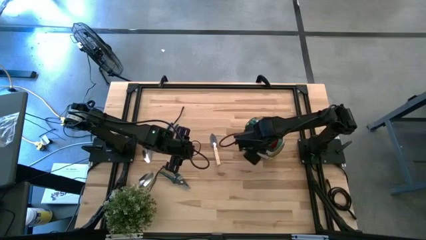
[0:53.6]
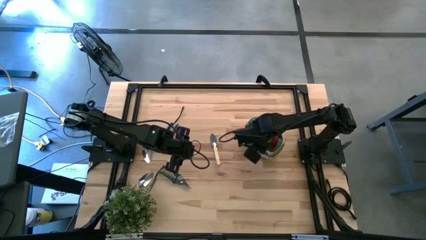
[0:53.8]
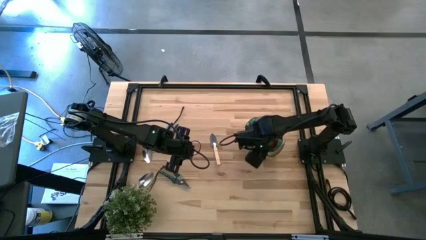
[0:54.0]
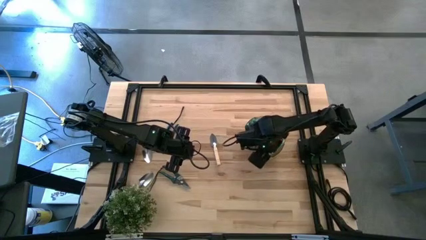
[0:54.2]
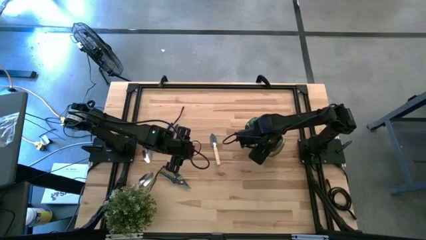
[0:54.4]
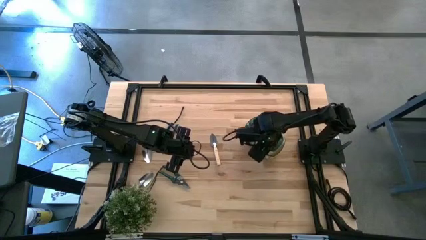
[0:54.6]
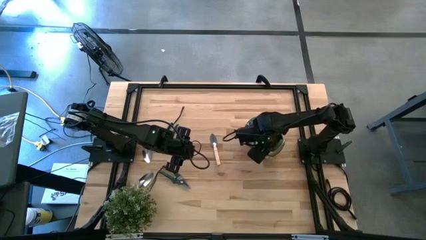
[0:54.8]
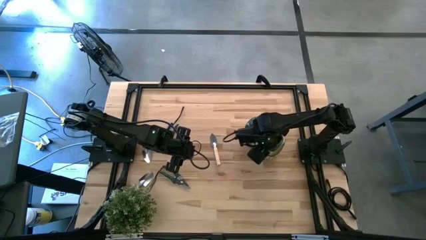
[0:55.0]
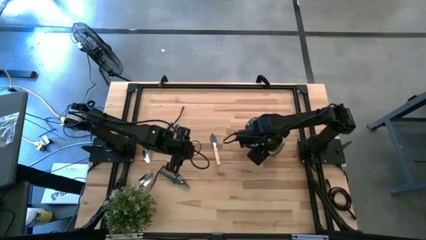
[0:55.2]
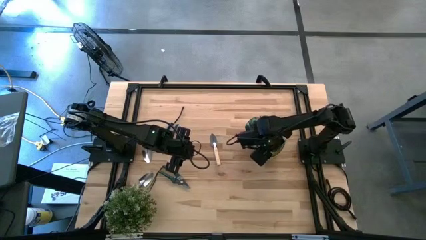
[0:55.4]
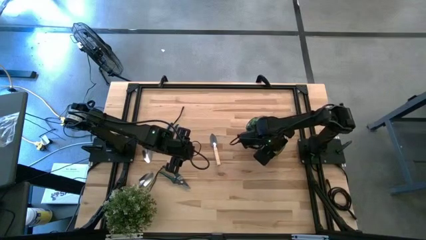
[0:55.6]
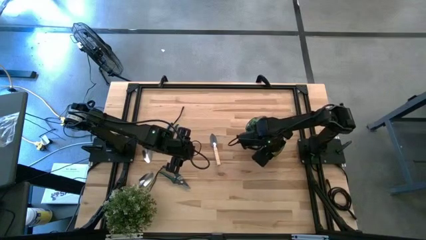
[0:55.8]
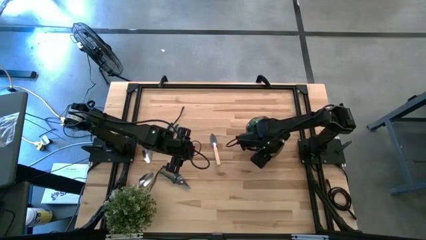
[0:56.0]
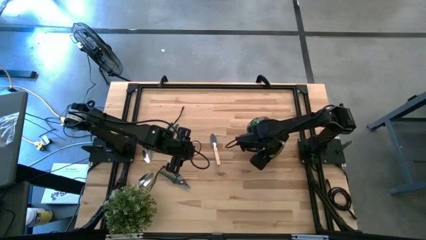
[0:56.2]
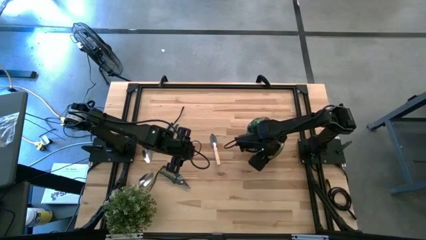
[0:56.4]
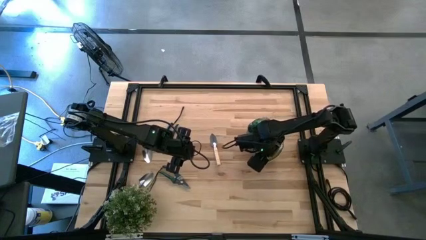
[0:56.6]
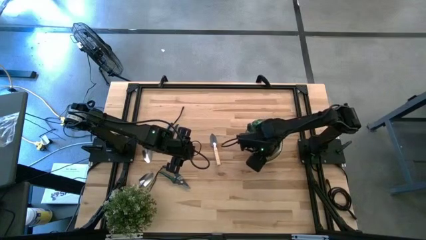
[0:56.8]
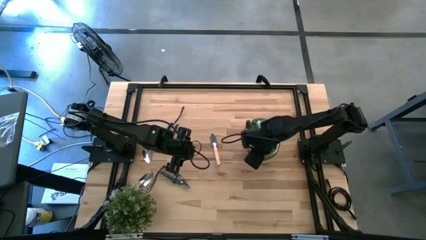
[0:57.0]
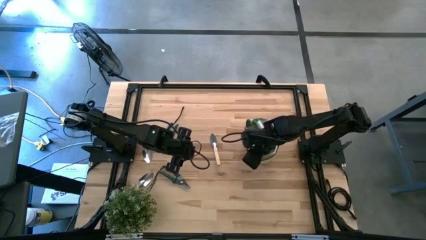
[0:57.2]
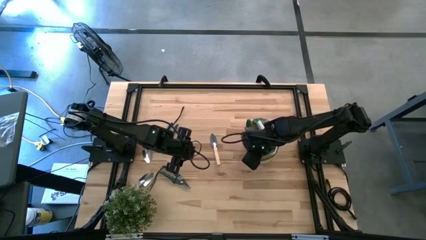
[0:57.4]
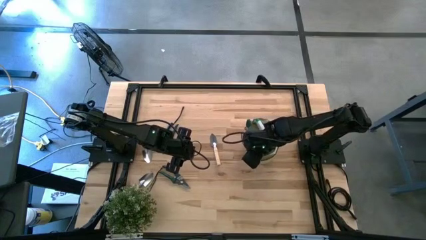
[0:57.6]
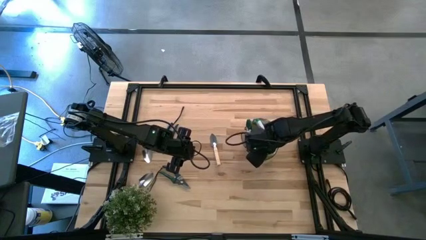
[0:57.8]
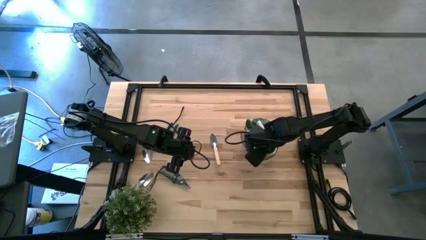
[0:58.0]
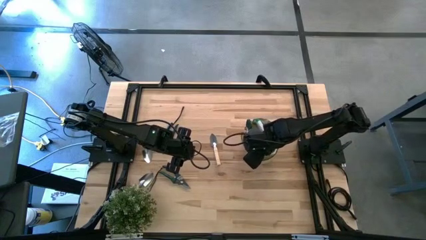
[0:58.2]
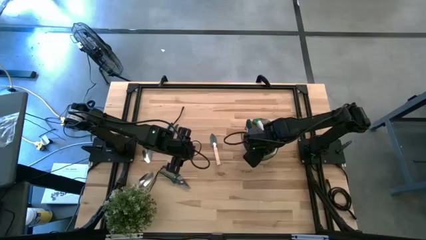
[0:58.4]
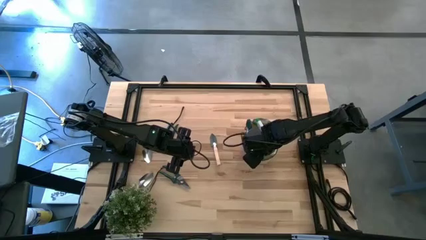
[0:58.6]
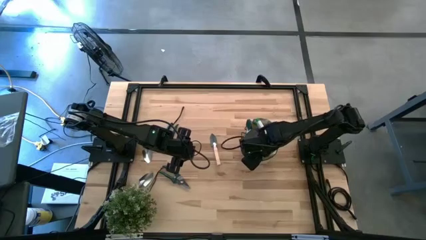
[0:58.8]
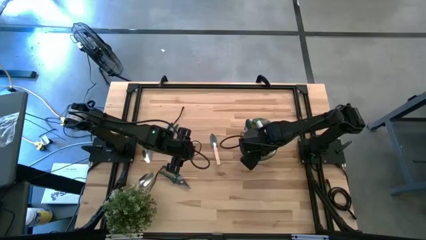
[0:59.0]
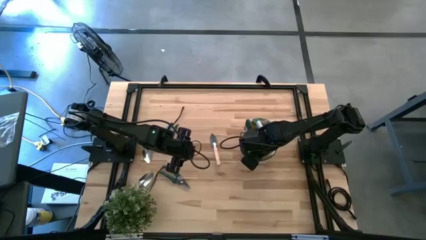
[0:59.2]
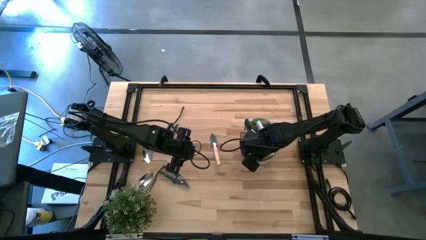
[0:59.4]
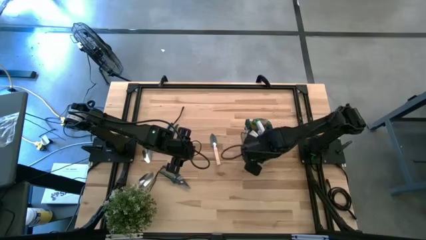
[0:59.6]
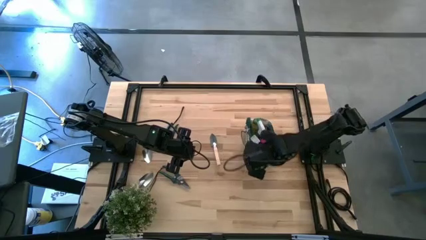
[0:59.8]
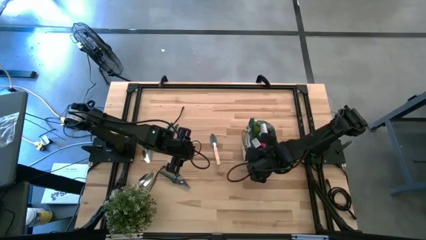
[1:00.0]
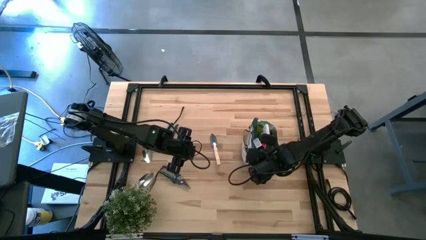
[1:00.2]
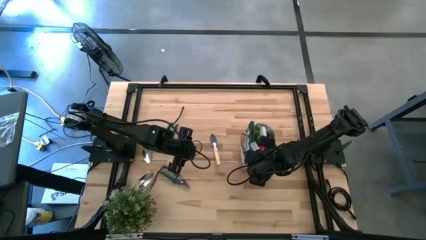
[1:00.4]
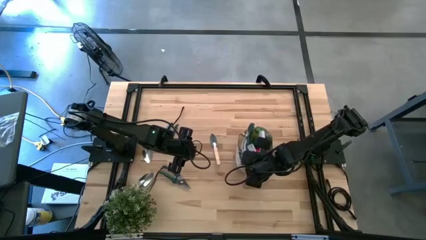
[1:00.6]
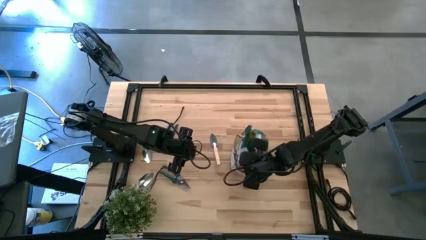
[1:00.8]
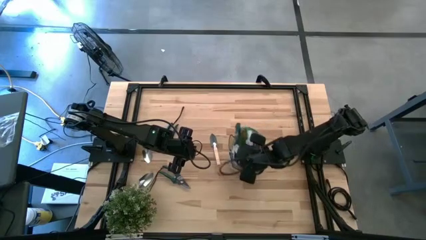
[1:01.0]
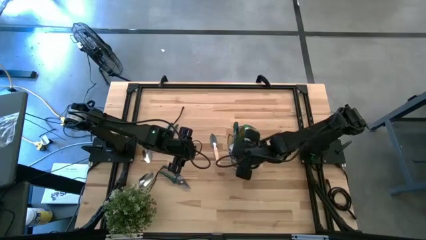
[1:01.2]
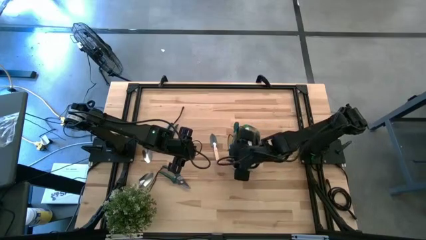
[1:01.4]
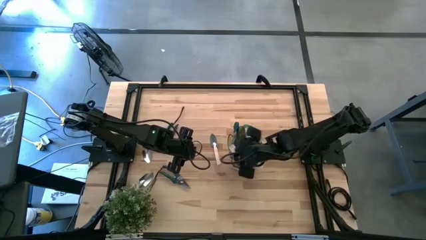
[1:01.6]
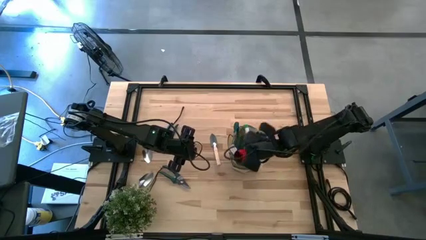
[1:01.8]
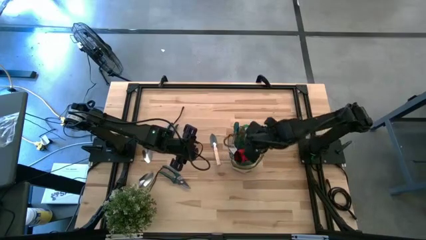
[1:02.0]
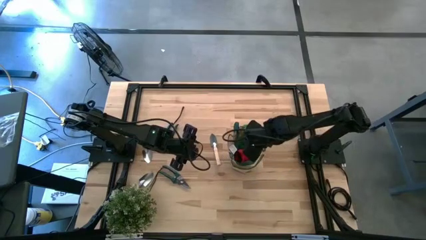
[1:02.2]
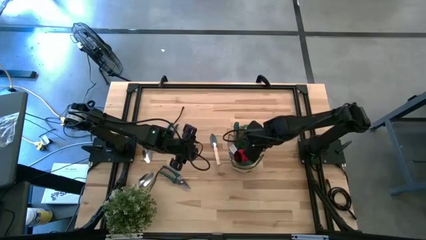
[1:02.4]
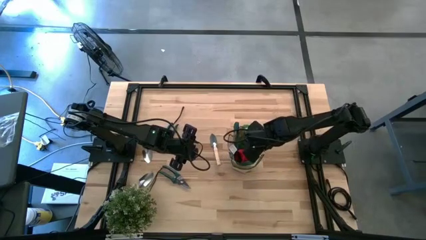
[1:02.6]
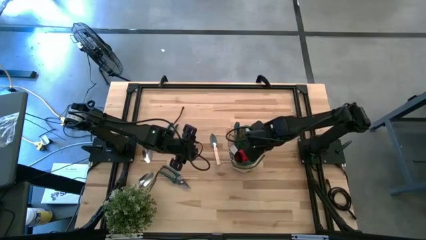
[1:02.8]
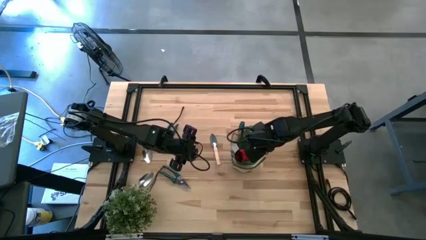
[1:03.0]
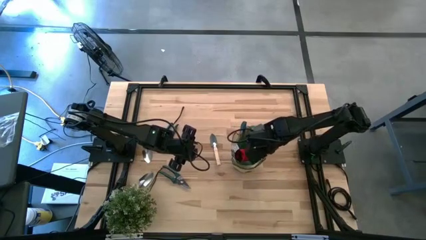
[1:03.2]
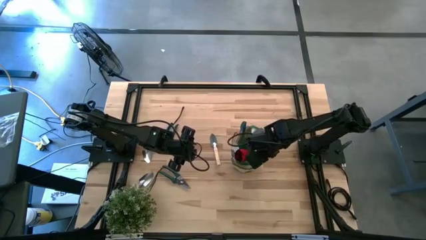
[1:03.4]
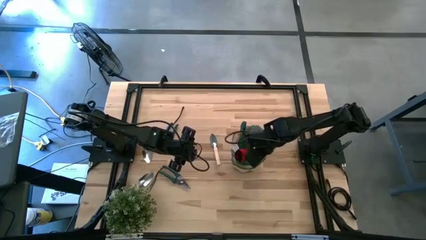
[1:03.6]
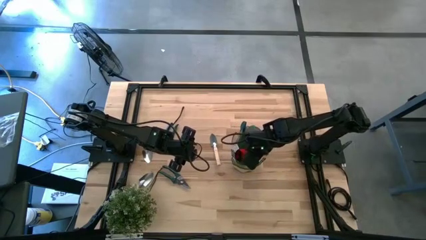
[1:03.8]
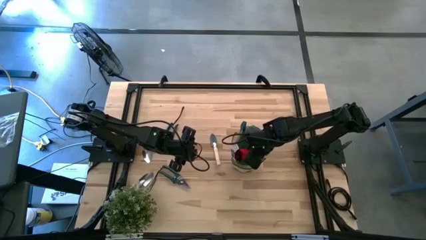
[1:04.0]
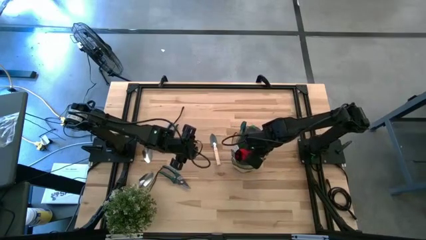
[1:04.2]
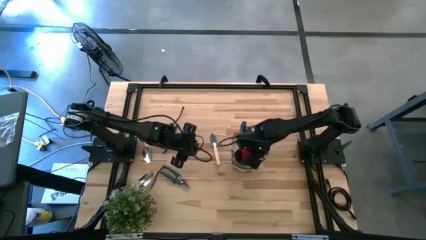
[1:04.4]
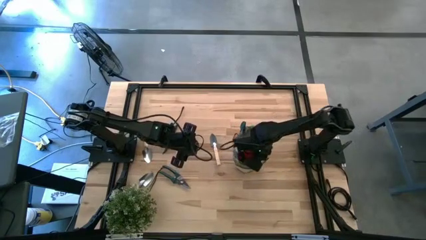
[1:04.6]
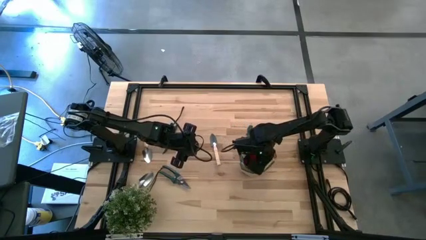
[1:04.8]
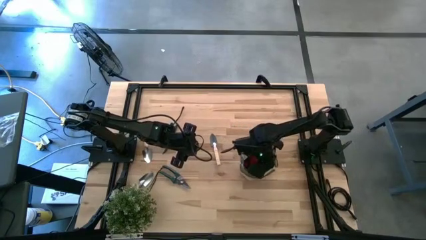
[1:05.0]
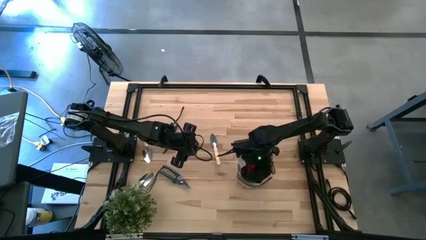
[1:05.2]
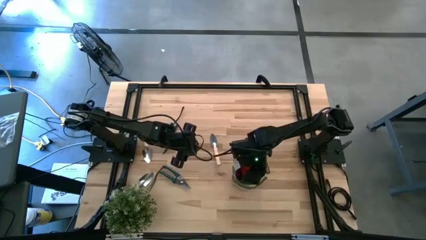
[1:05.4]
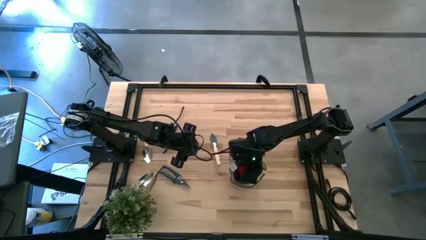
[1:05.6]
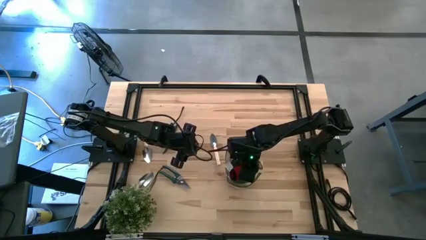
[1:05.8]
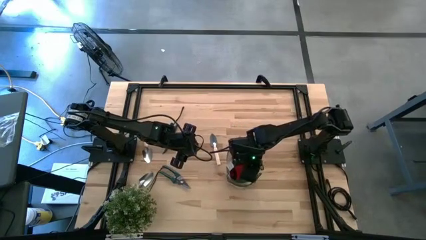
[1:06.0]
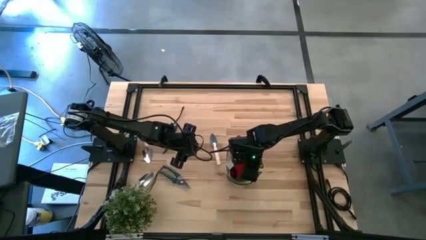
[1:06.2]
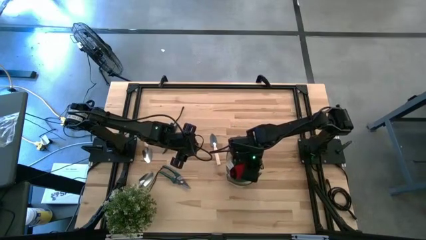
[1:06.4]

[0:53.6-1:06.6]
Task: Pick & Place Garden tools in Gardening bag
Adjust the green gardening bag

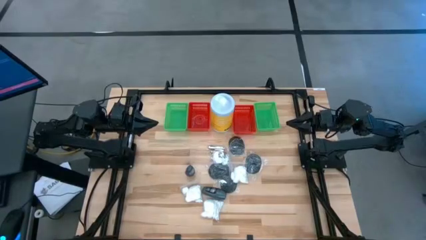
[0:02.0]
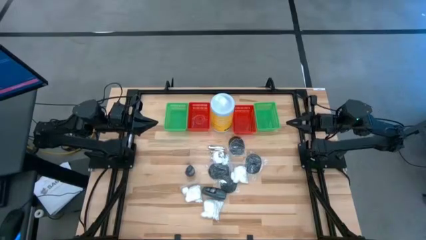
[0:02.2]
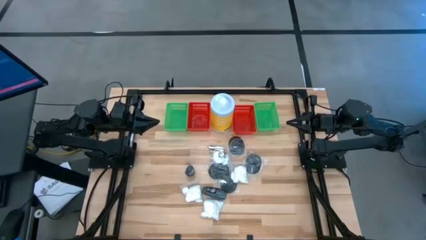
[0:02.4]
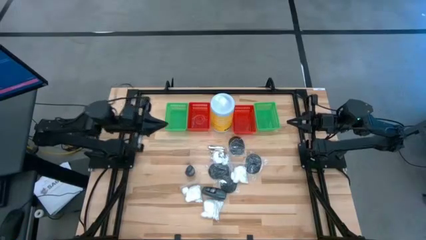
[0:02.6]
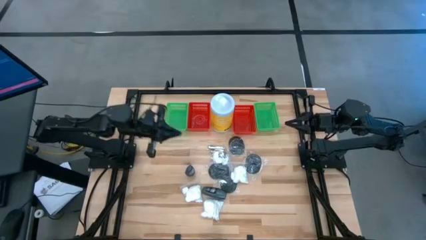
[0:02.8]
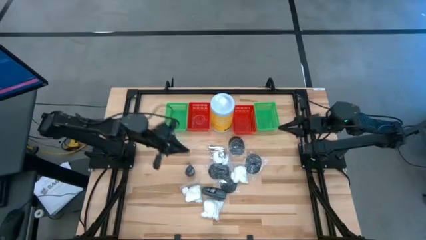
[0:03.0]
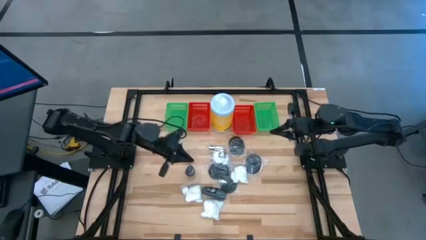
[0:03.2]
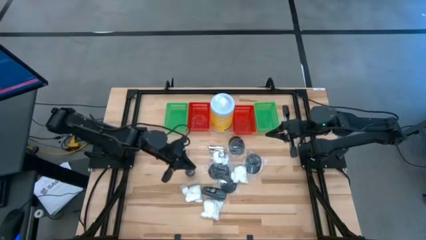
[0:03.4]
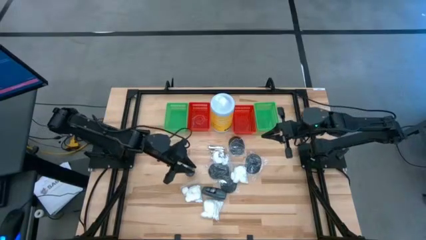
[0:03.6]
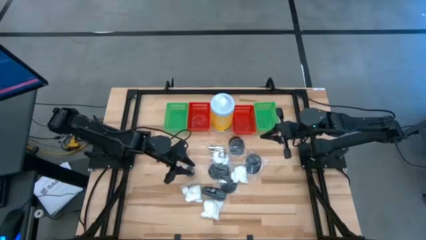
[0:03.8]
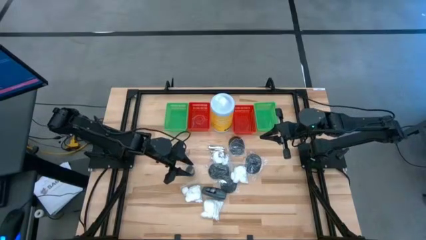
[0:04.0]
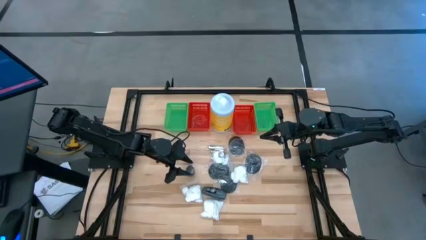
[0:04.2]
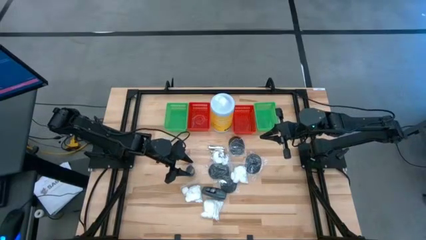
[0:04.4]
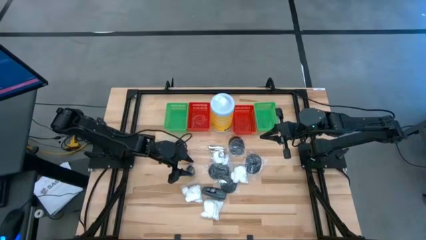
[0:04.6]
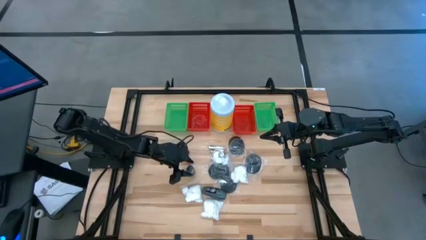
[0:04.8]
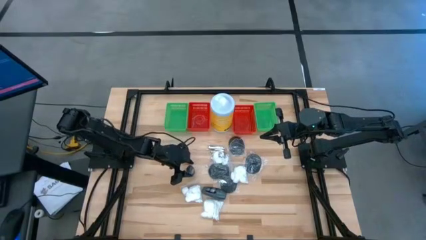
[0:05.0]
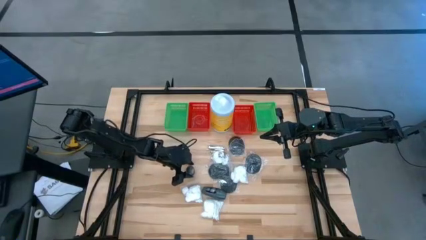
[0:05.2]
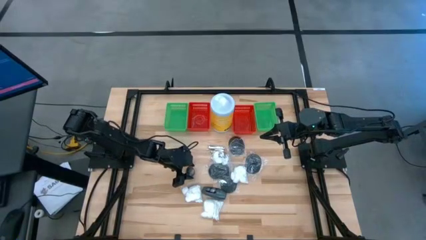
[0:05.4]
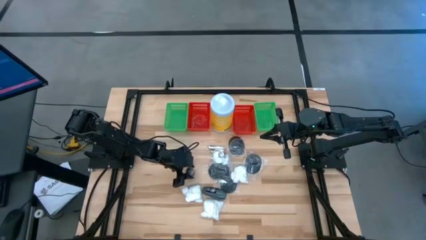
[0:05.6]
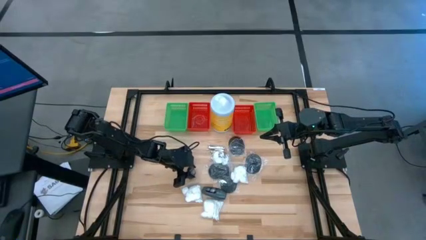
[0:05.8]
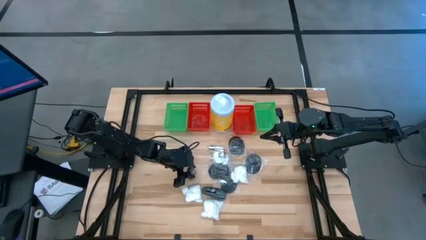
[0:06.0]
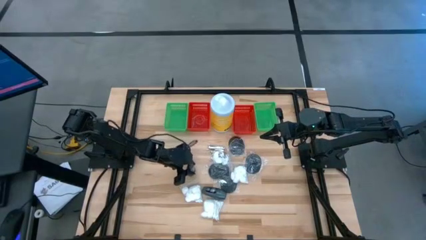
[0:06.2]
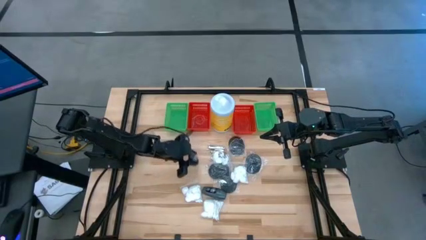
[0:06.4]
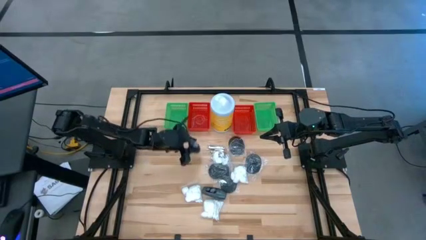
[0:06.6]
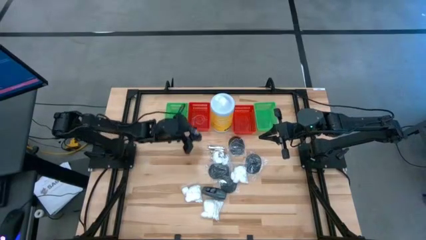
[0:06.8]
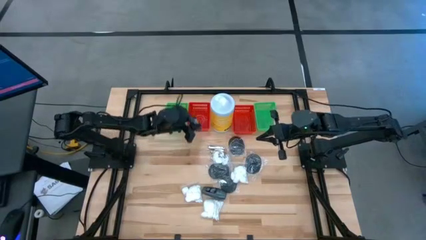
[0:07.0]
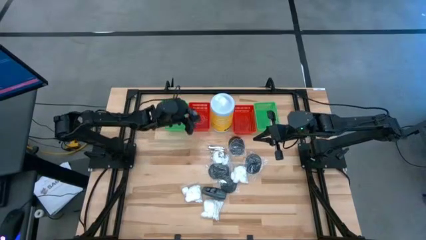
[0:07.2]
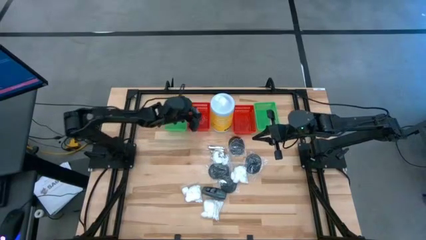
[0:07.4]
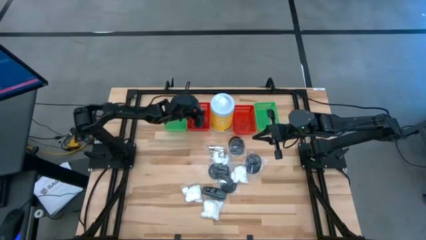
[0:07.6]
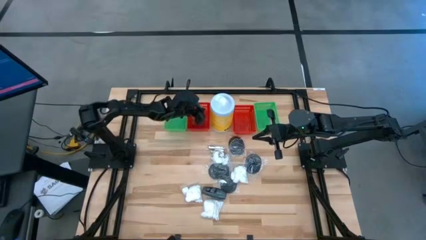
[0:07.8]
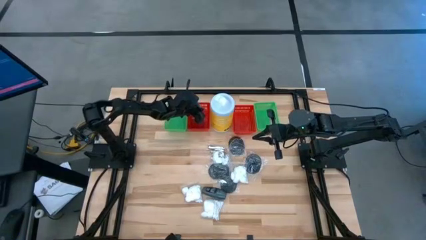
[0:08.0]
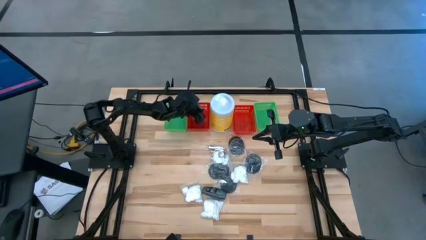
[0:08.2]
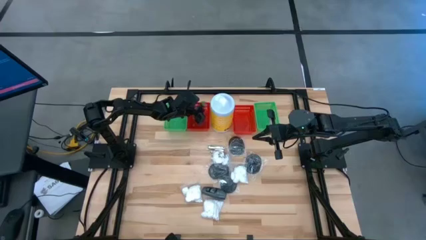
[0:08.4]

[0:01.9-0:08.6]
Task: Pick & Place Travel size toiletries
Put the black deodorant into the left red bin
